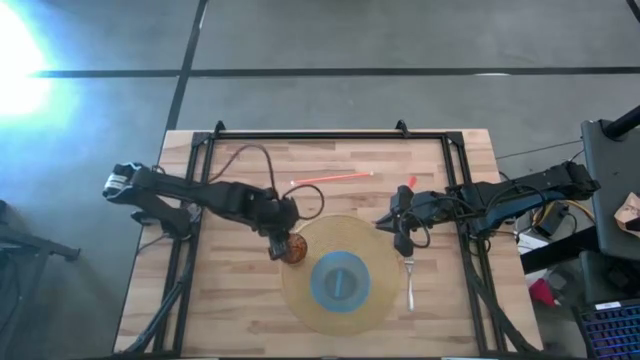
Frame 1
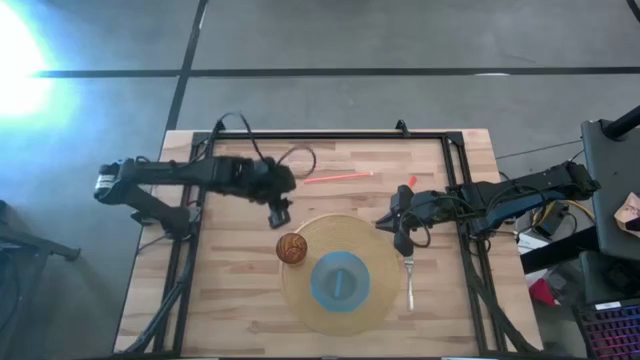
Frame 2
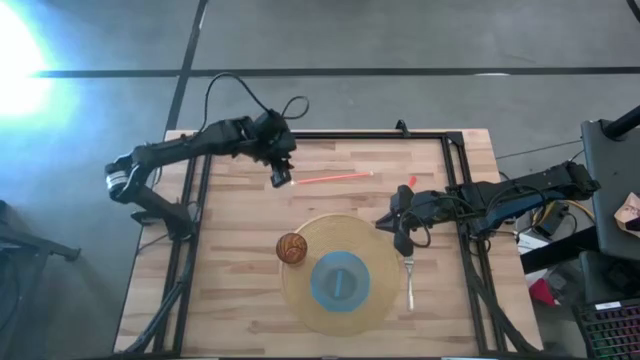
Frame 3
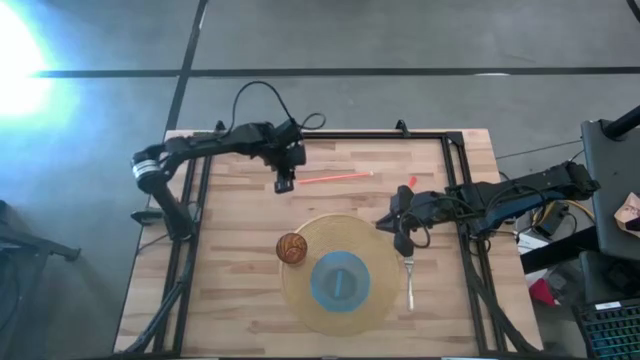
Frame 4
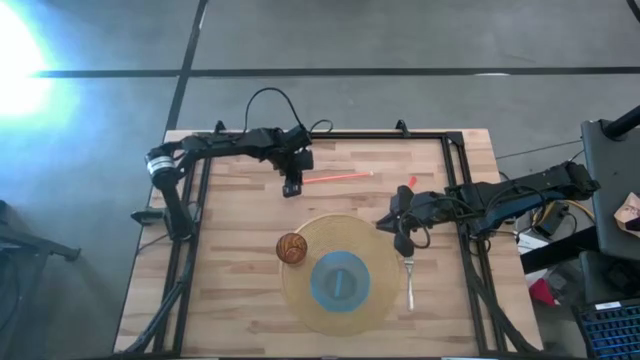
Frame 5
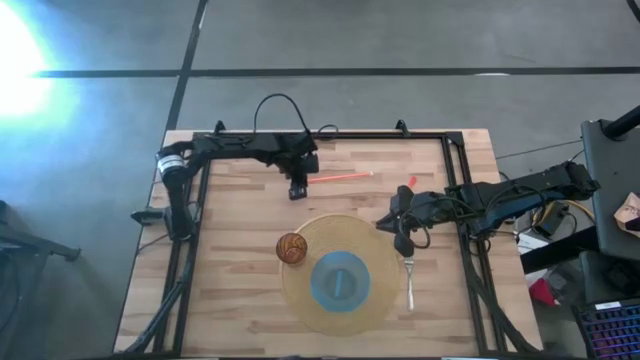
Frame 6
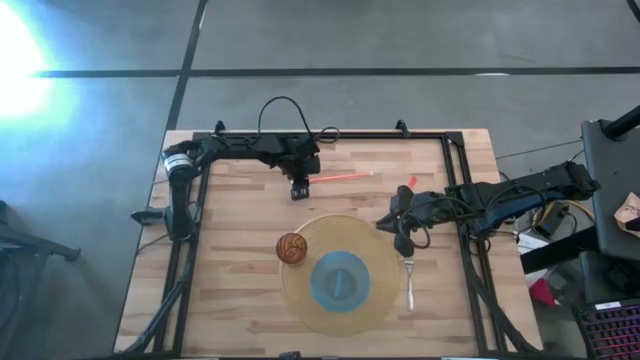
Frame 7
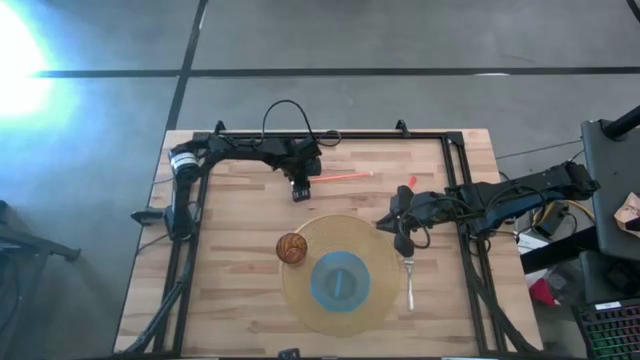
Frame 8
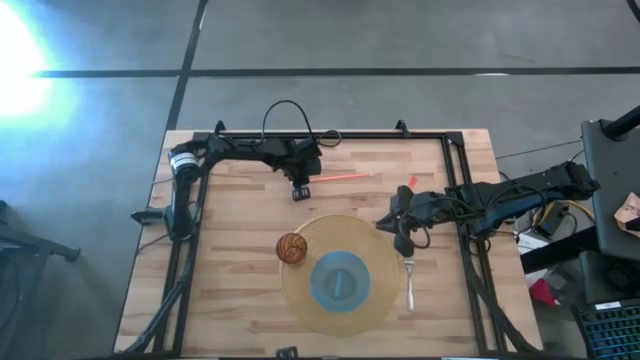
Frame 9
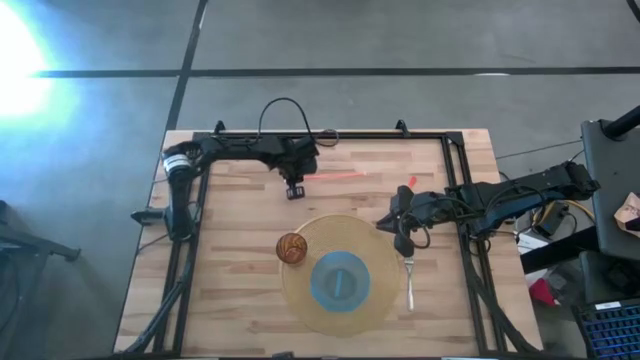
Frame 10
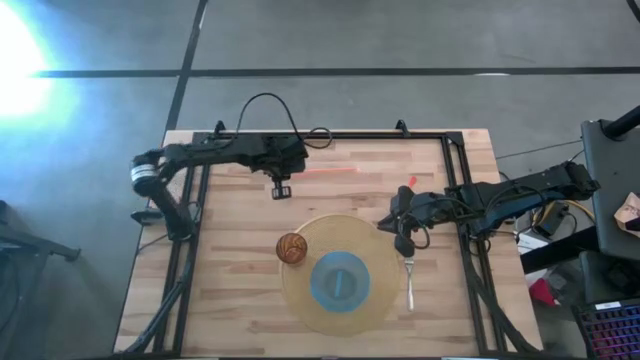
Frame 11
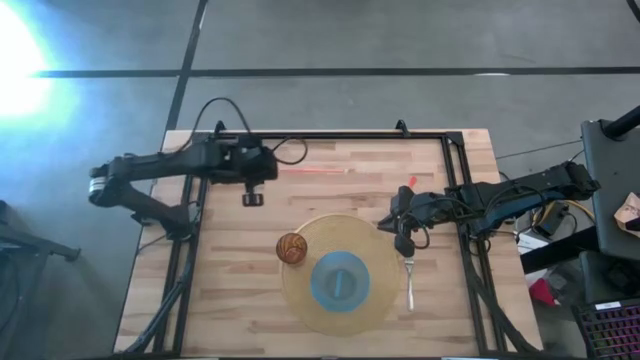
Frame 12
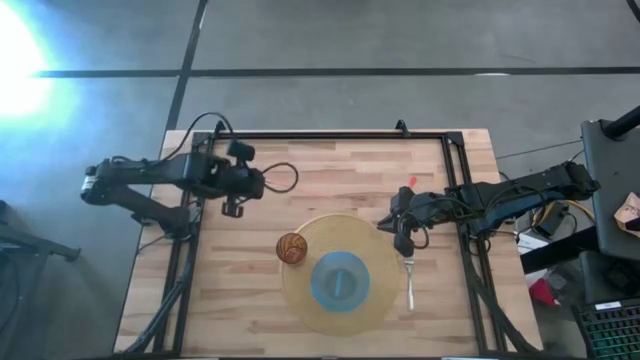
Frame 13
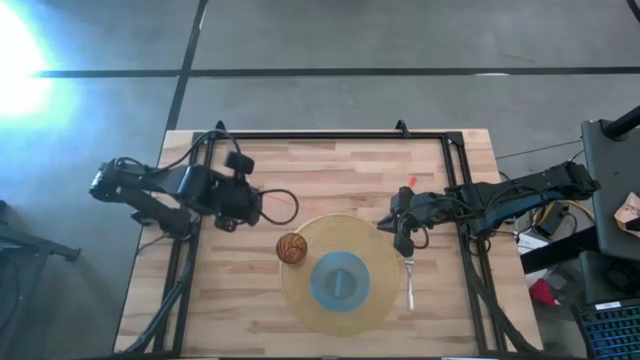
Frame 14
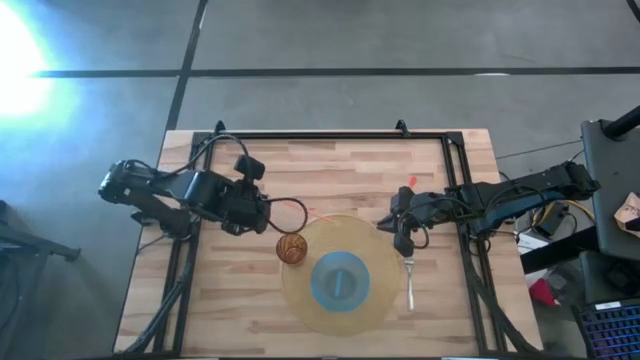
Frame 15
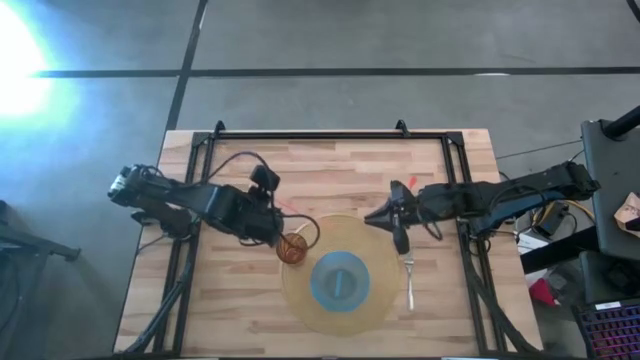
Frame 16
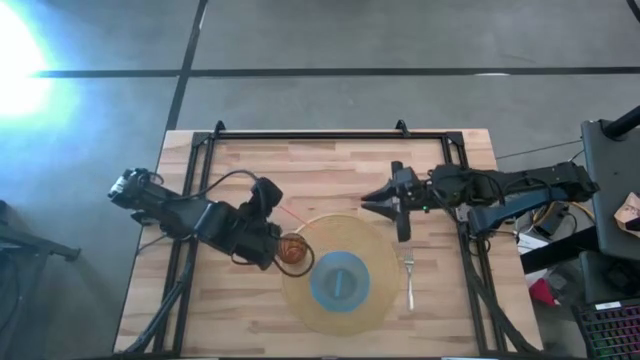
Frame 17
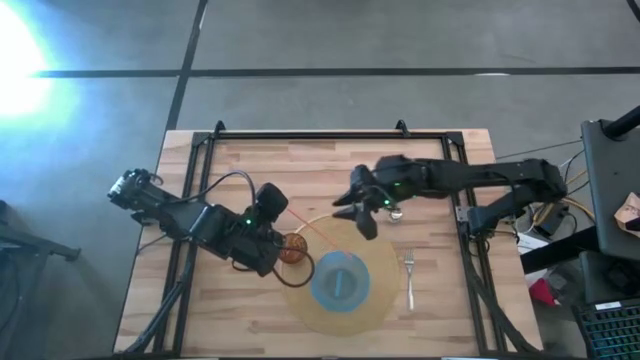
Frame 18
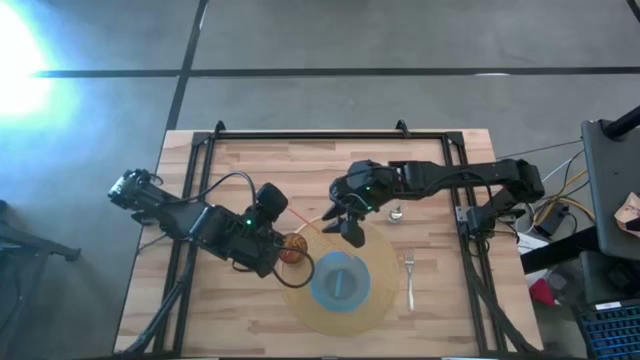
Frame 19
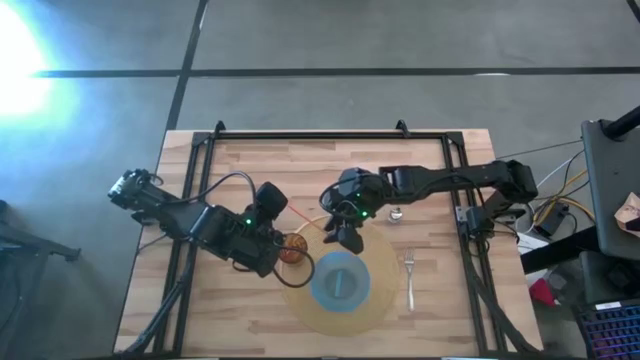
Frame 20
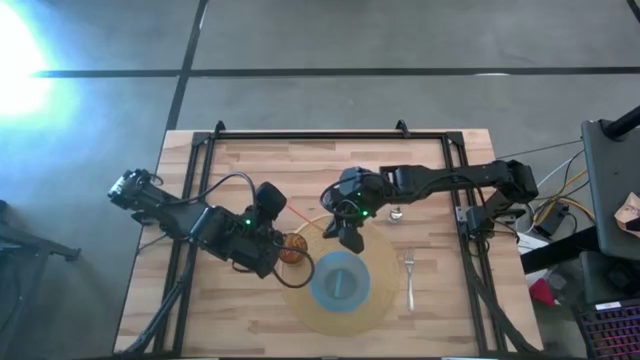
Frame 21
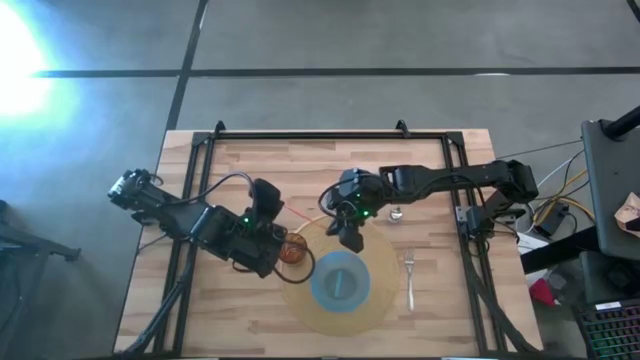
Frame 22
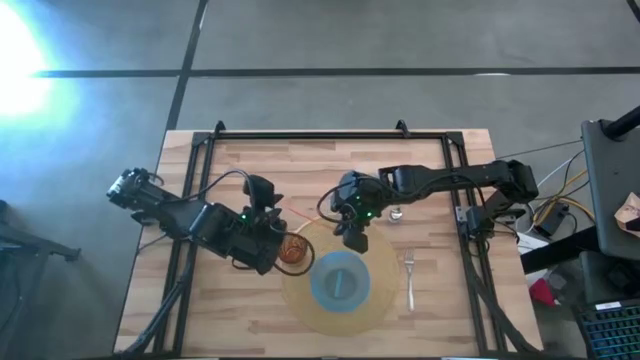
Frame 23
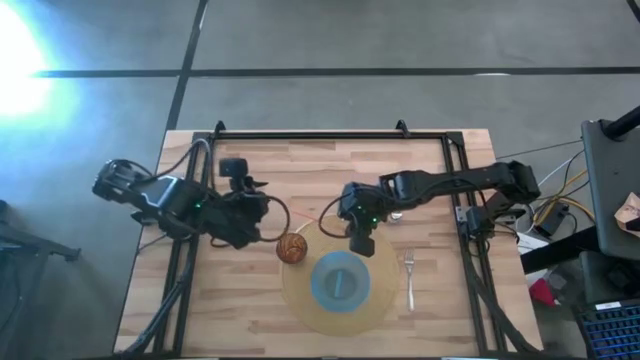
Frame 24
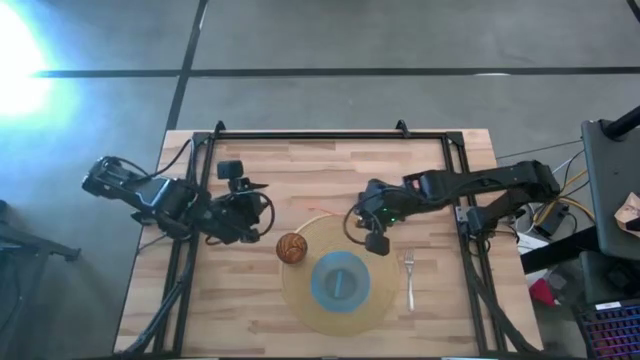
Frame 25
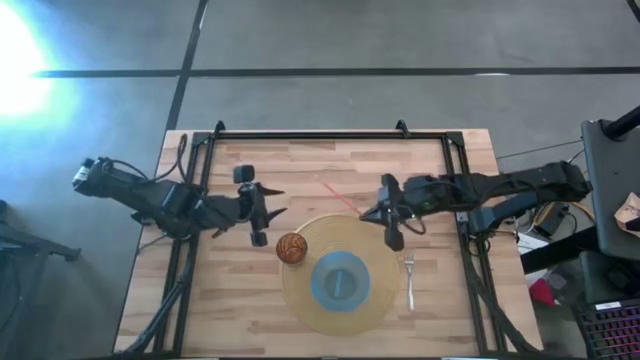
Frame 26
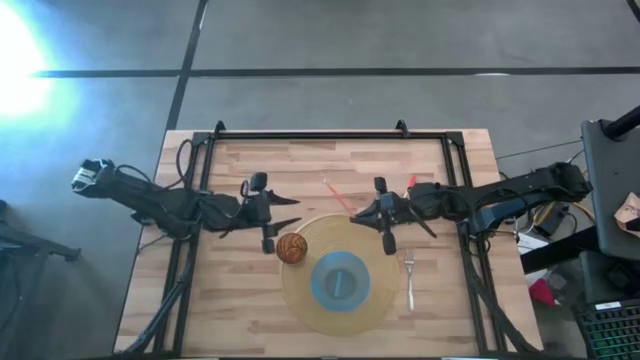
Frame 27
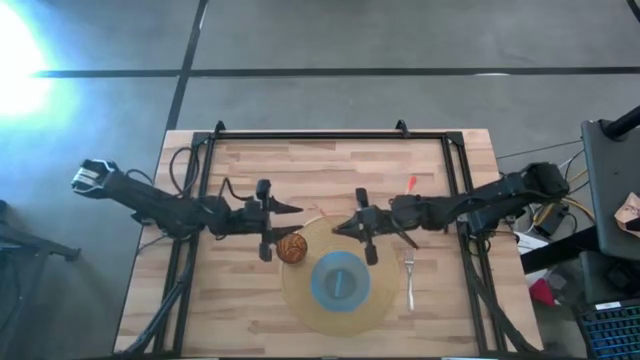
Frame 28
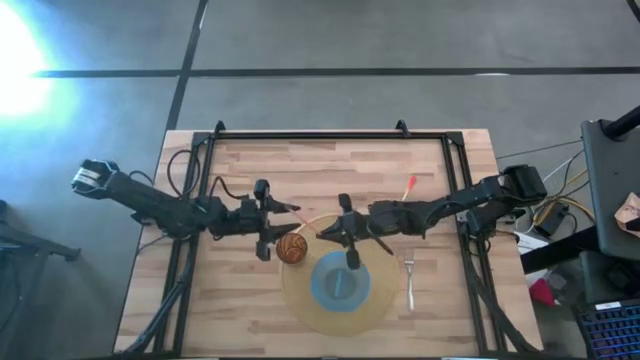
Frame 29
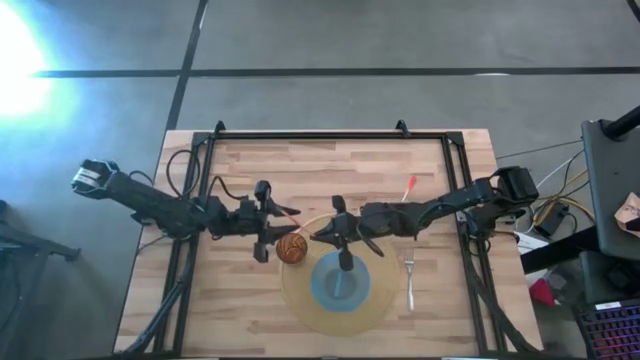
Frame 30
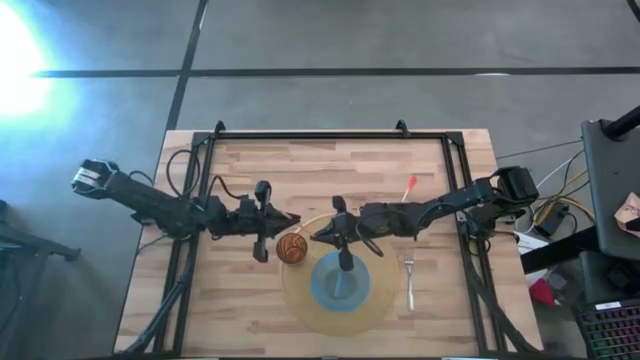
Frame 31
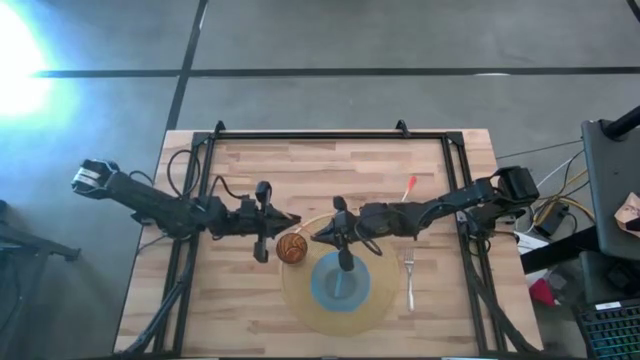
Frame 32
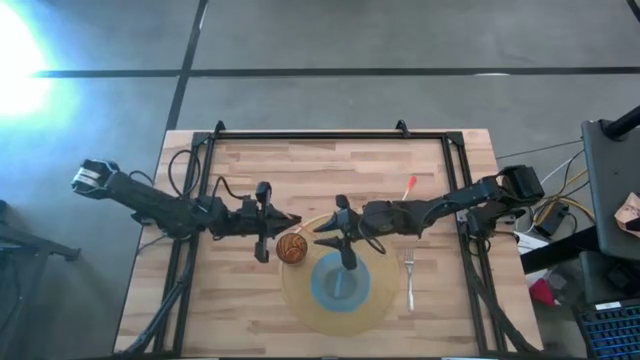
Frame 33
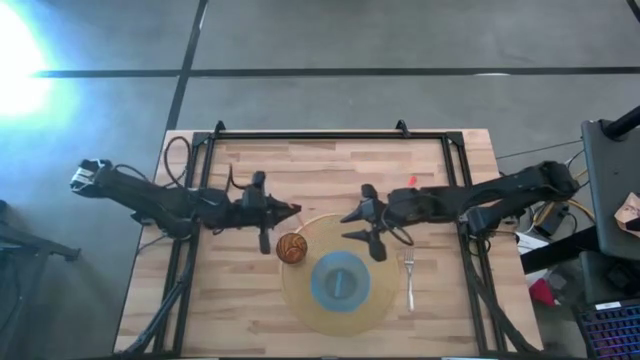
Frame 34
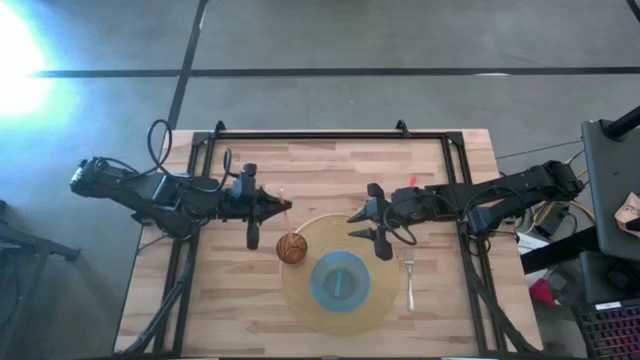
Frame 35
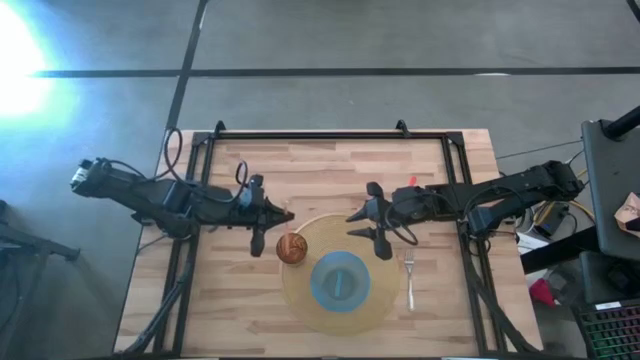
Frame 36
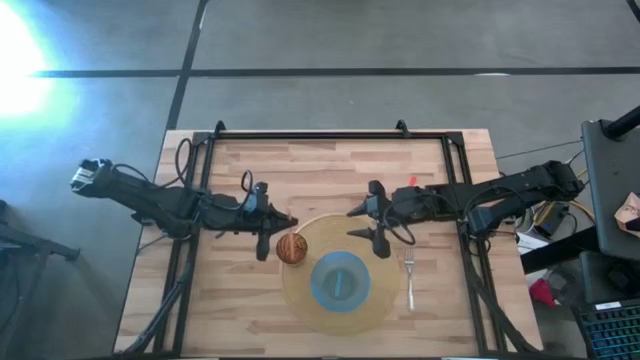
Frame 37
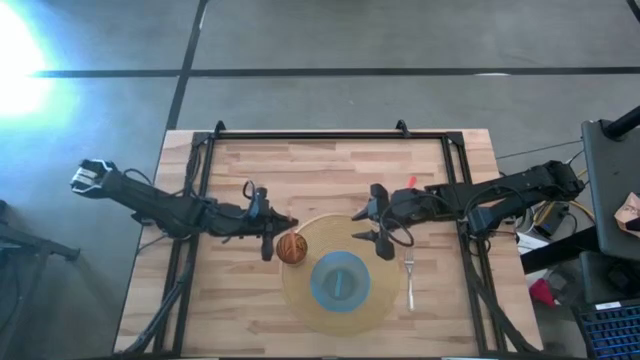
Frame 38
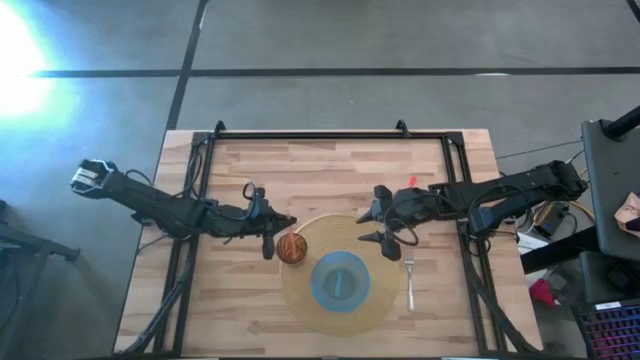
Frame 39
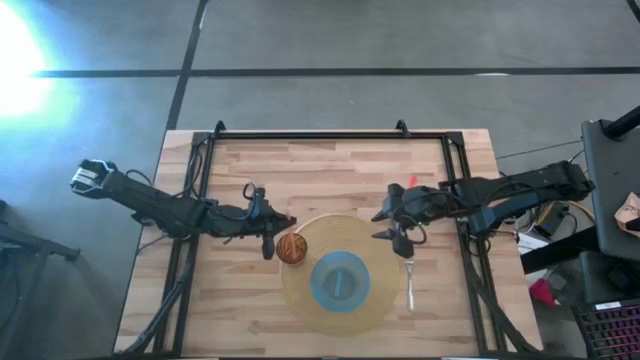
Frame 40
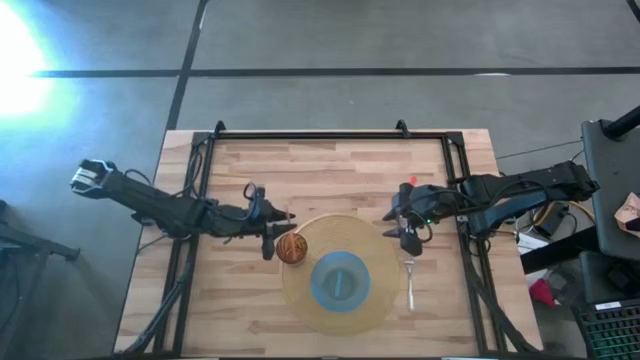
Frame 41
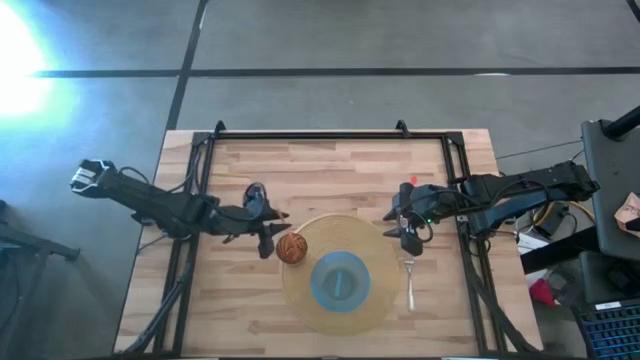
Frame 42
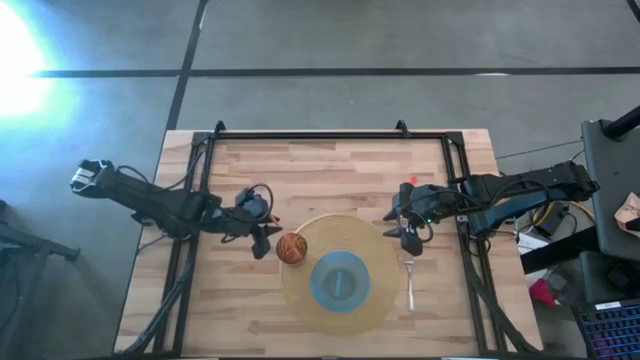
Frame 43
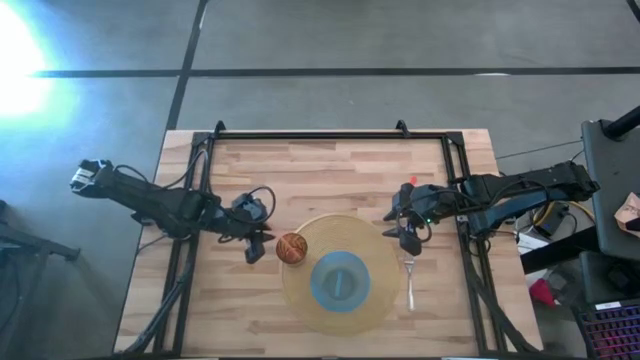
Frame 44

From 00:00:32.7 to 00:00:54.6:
Task: Pick & Place Utensil
Put the straw into the cup
